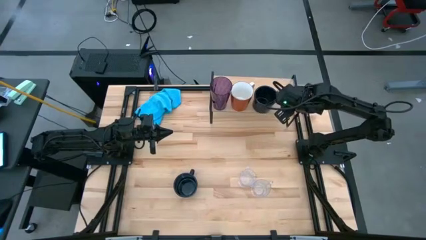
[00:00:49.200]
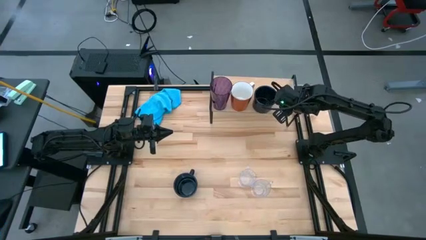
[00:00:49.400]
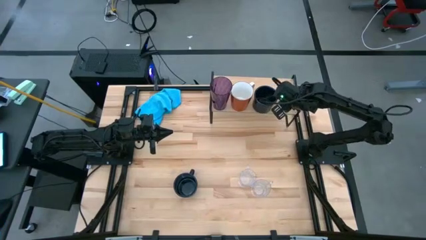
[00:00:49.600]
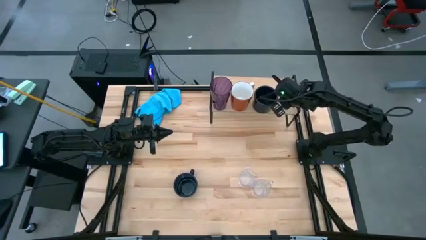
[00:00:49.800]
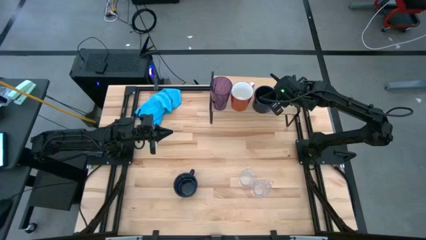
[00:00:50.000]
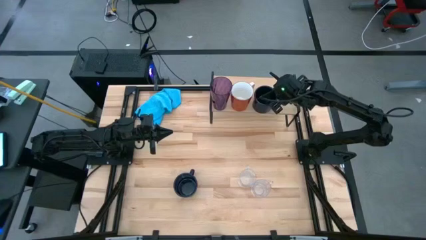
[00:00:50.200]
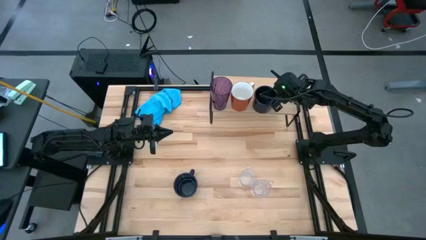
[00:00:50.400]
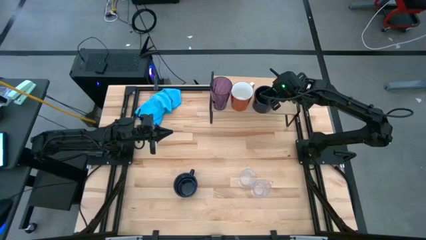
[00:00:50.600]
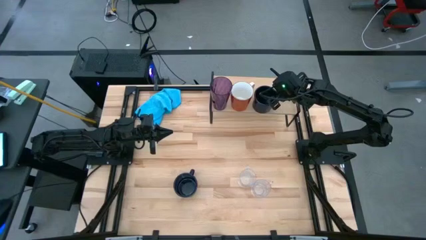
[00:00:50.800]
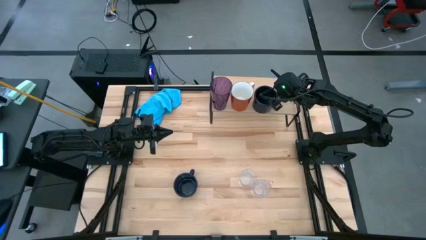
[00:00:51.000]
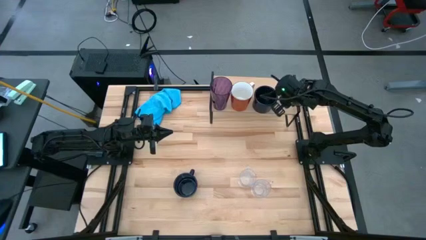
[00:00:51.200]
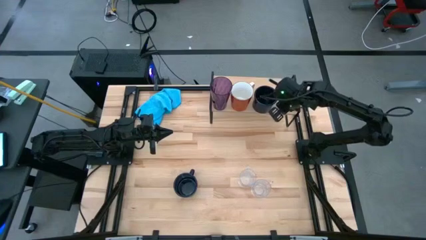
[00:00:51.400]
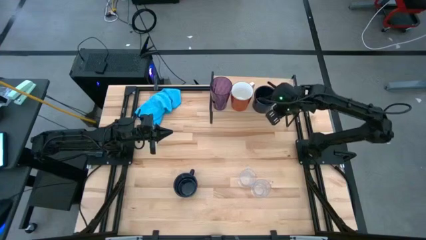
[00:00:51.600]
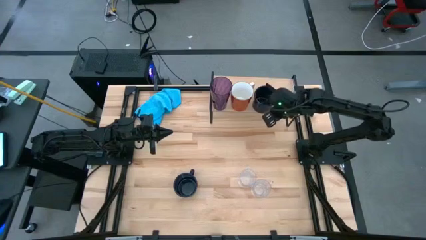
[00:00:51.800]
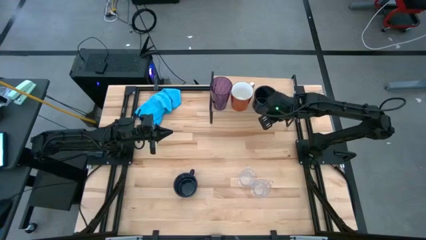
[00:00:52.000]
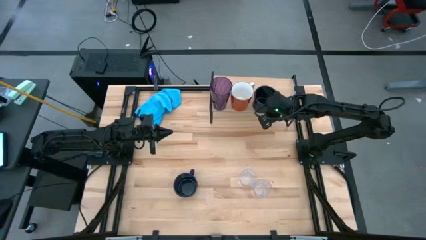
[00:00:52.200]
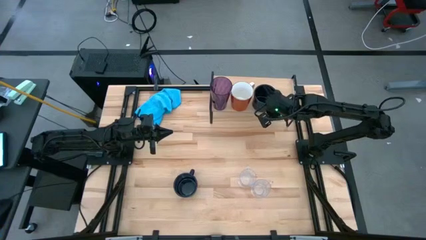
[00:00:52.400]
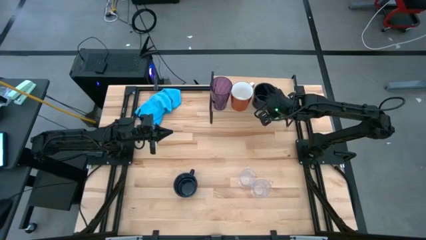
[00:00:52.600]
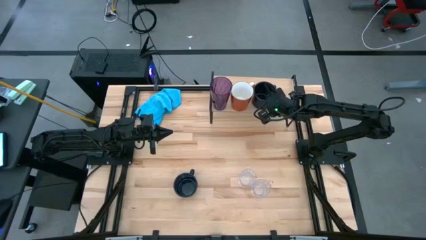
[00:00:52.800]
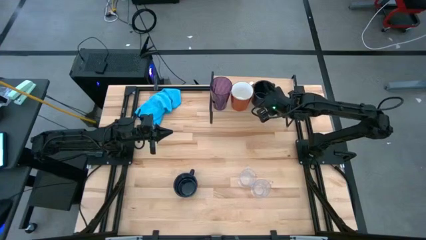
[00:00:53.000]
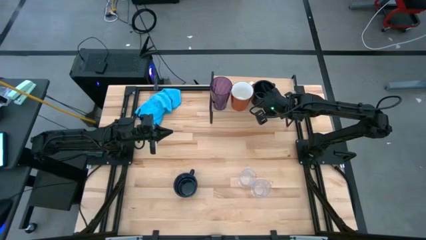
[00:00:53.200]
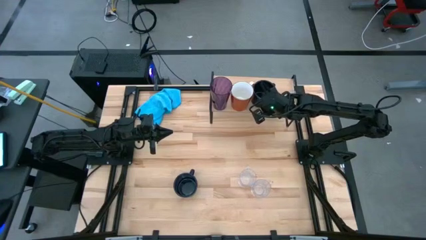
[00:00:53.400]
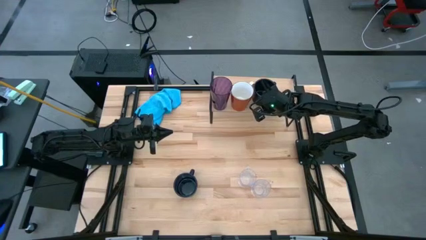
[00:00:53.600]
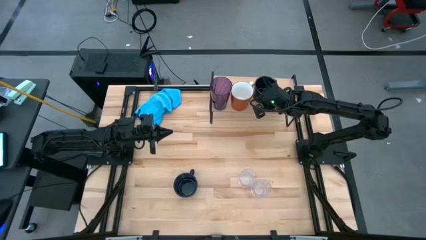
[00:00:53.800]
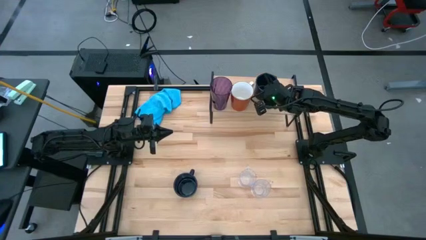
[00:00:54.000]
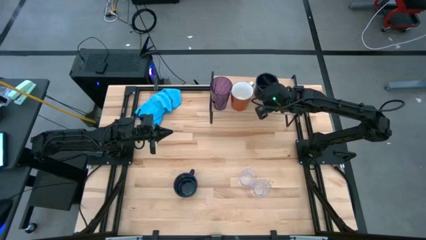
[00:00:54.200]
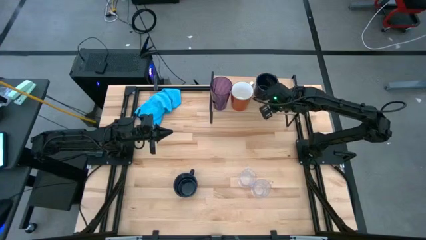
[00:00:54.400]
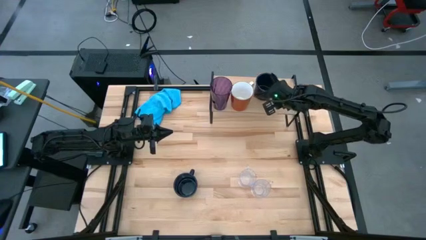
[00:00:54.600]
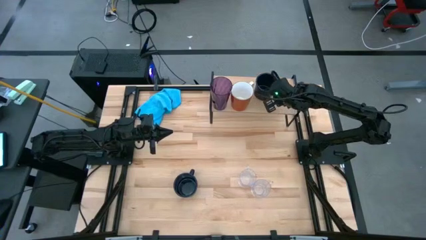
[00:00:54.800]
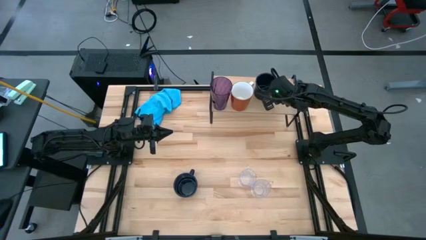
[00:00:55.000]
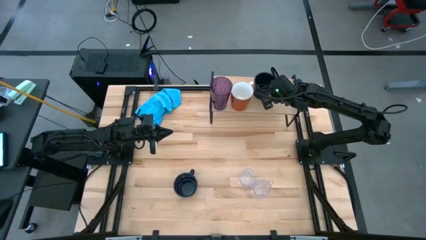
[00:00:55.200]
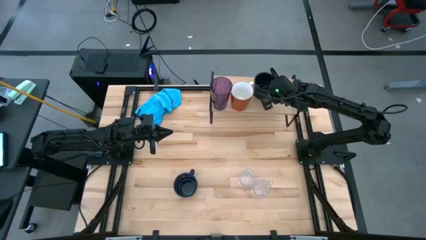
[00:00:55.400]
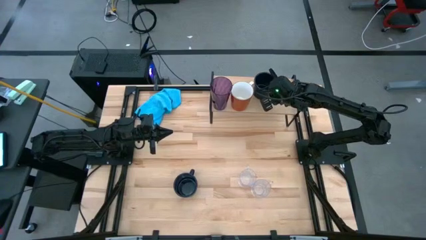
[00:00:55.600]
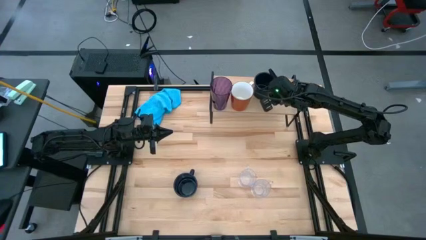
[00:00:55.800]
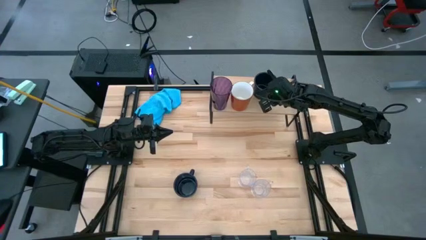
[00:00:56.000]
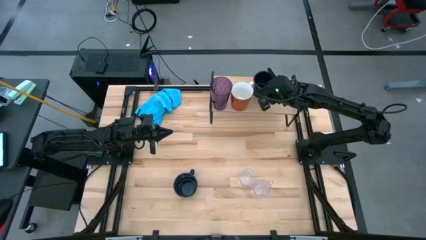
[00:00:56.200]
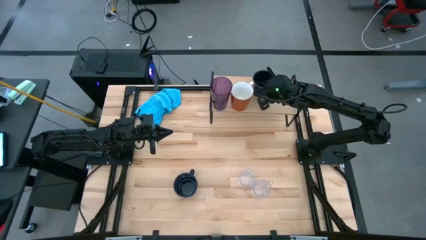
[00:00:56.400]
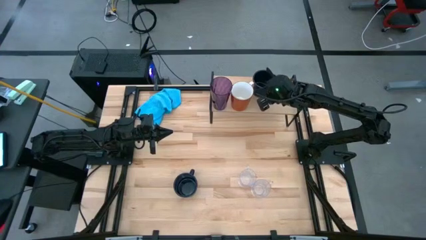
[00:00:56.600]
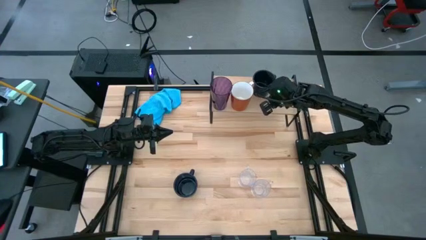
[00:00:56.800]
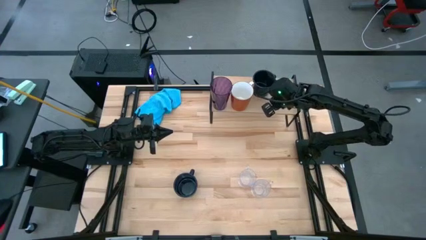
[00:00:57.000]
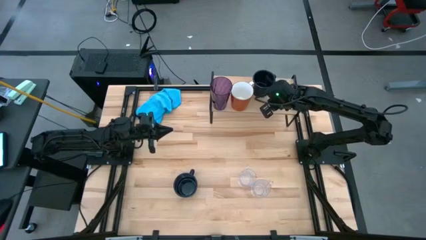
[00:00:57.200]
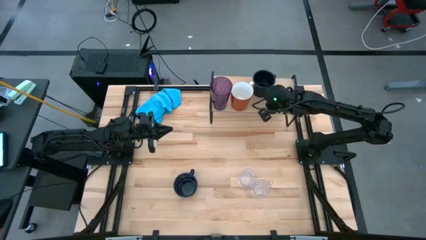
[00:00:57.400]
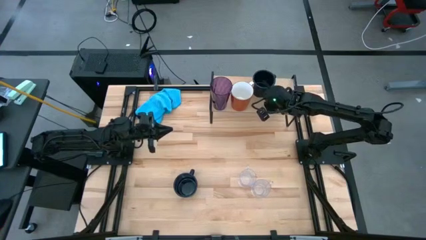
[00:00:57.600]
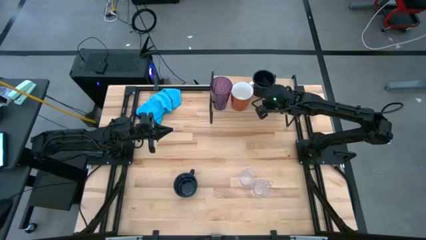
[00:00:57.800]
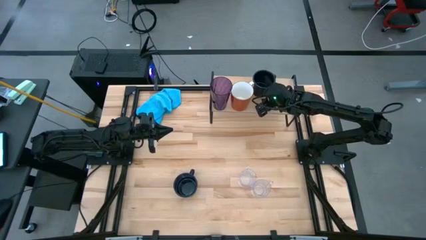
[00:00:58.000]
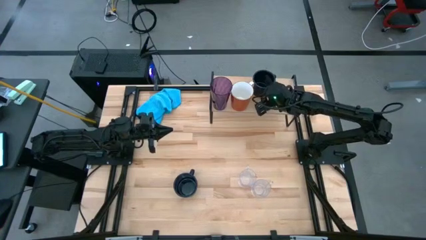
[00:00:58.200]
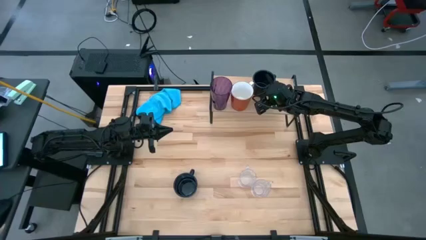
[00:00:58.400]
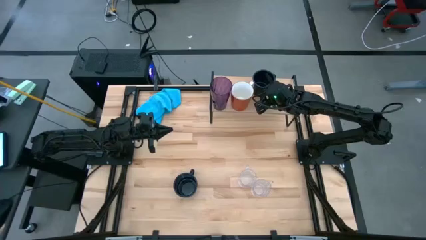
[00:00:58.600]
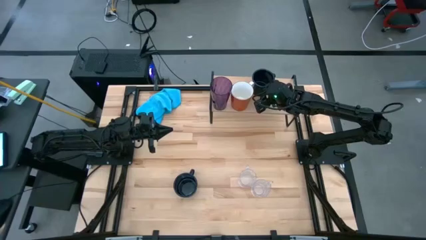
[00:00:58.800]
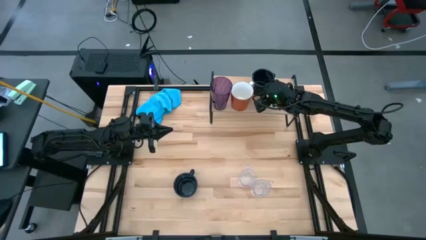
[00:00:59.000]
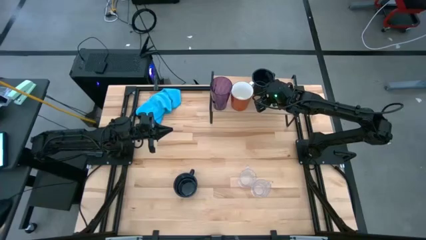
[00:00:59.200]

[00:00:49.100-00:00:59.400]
Task: Stack small to large cups/mugs on shelf
Put the right black mug on the shelf

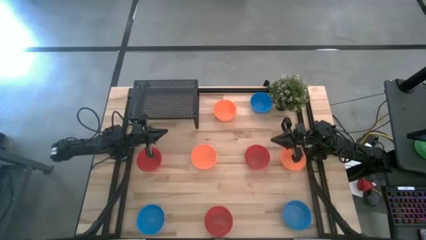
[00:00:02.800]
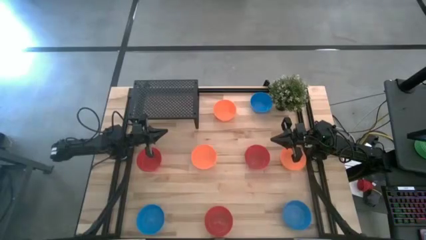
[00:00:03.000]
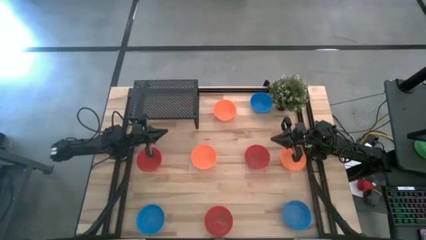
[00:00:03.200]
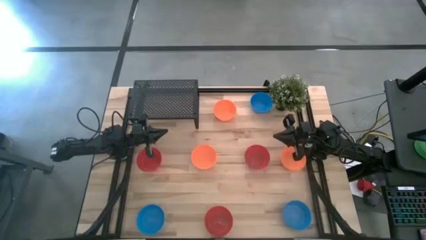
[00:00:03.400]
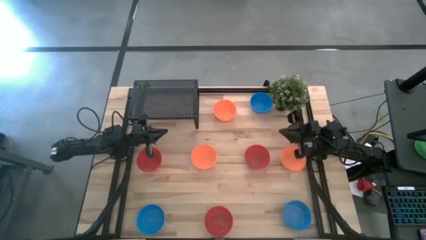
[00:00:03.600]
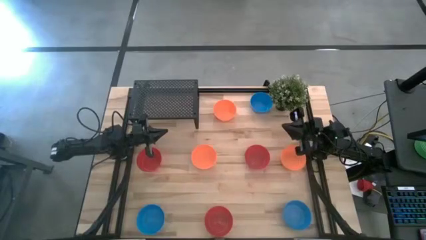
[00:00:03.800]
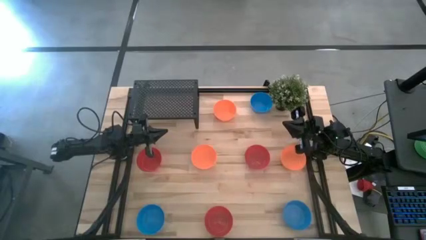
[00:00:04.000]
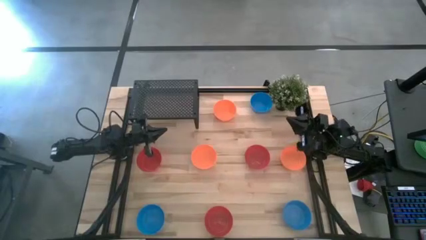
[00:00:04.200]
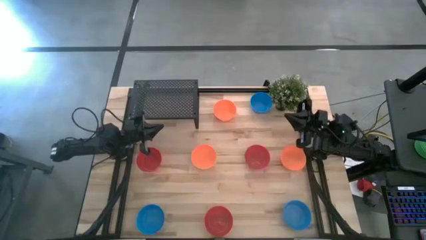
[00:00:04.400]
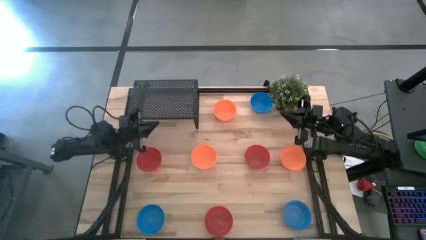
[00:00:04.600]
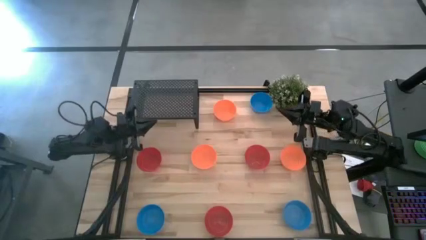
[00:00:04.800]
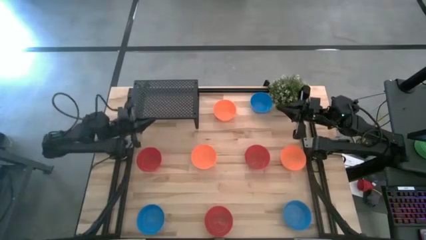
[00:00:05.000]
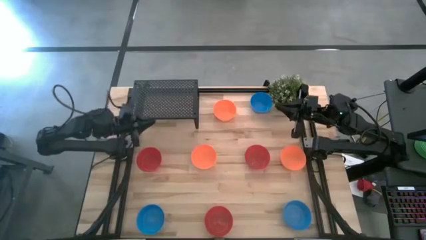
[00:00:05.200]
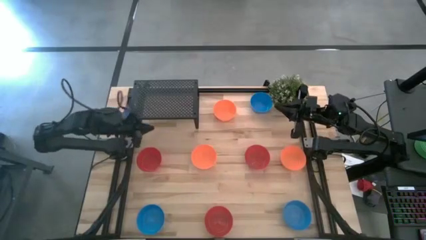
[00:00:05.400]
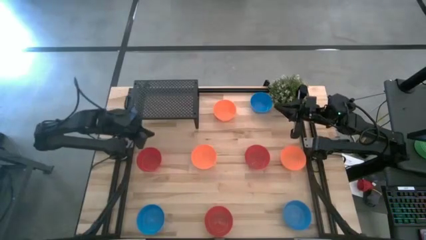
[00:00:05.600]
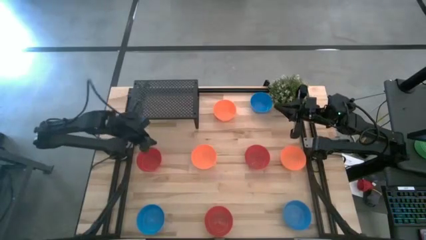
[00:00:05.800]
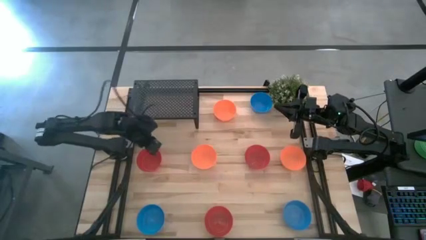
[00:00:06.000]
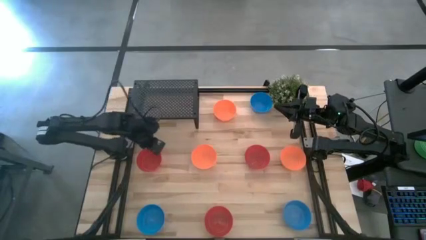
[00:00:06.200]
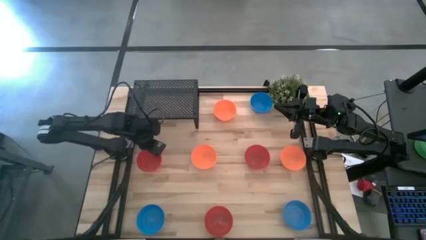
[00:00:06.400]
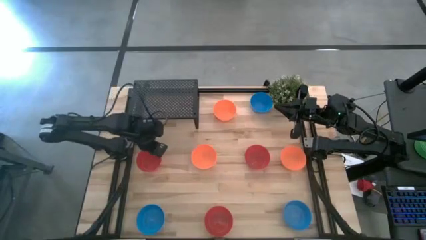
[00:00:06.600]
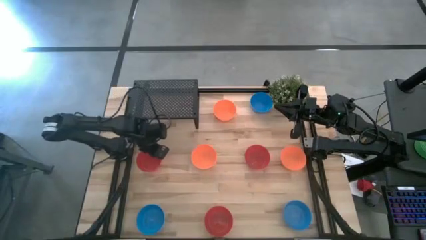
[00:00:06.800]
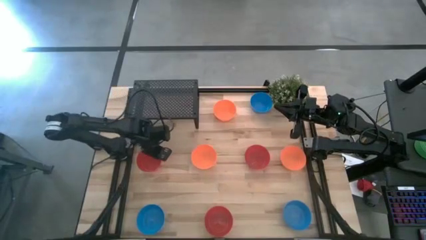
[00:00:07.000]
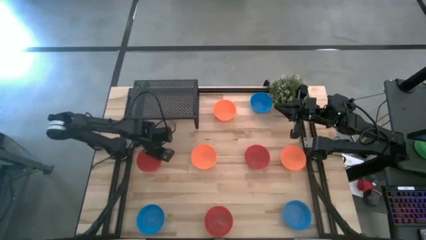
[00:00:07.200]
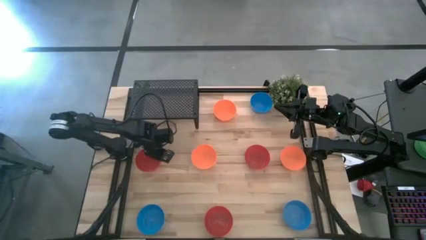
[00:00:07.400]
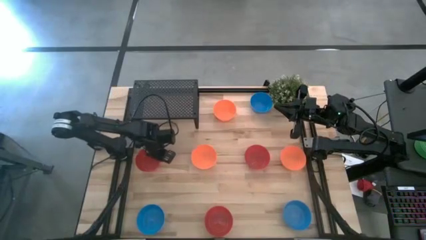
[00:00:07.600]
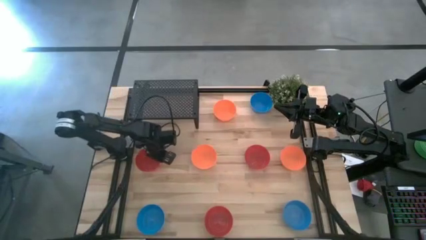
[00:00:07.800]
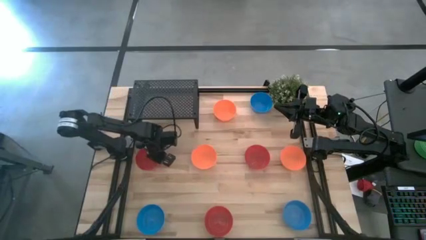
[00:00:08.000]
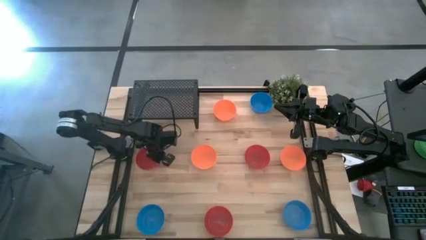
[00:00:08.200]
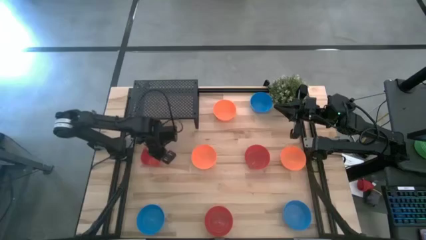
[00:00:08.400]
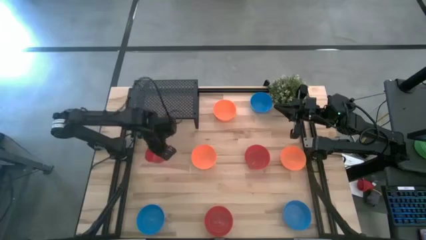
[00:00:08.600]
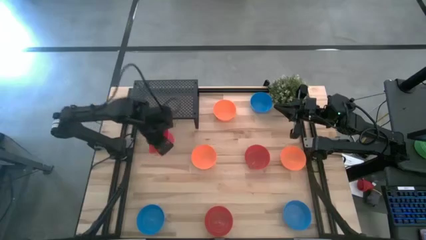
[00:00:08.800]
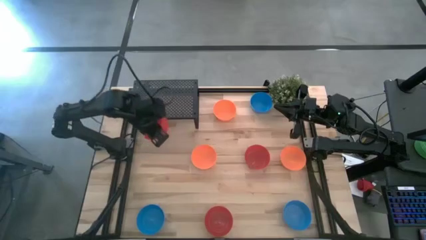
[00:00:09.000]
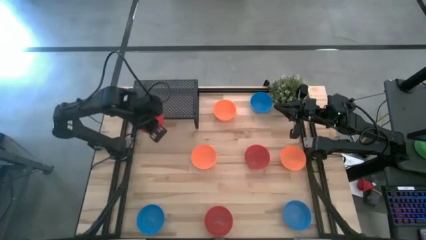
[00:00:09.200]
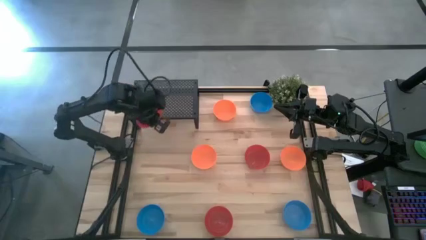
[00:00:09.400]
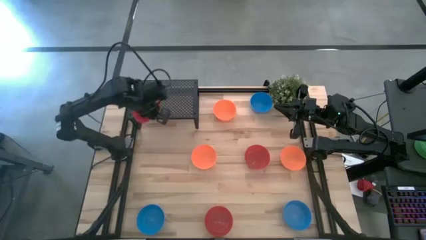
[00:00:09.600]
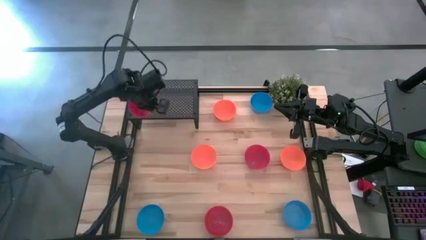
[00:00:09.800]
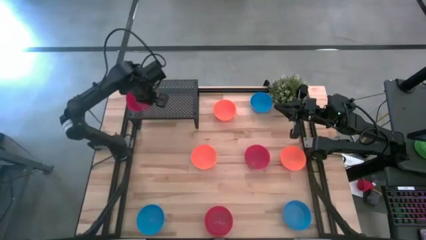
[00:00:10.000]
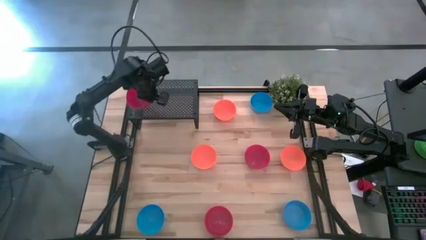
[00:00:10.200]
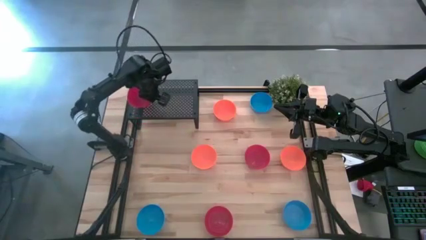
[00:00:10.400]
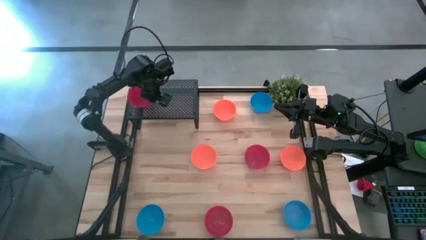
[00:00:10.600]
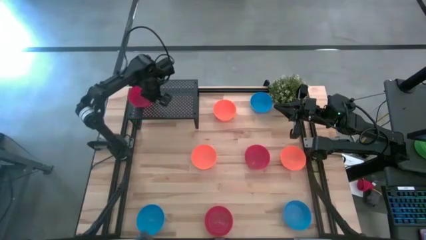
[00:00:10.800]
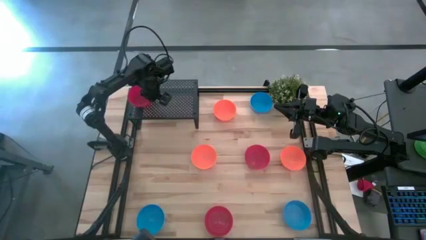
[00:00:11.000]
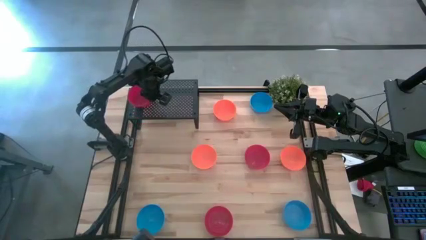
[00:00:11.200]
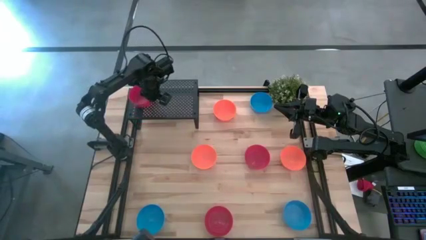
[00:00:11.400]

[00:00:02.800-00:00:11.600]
Task: Pick & Place Mini bowls
Put the top left red bowl on the shelf
